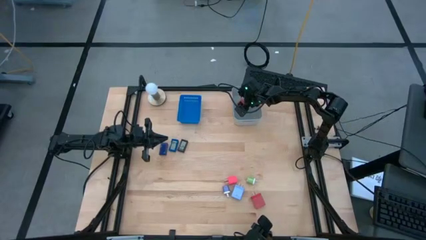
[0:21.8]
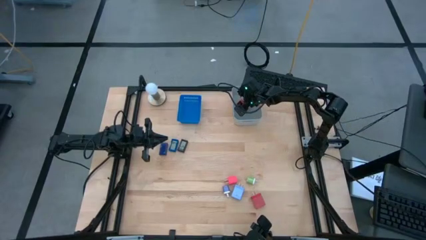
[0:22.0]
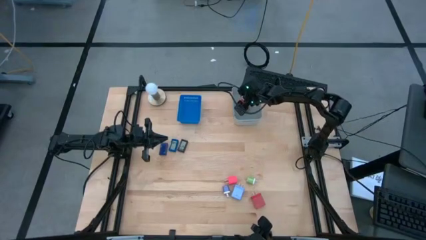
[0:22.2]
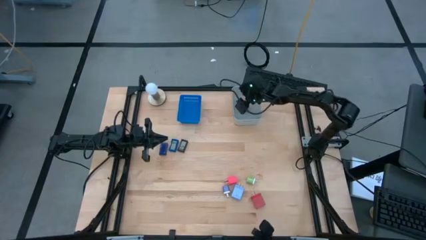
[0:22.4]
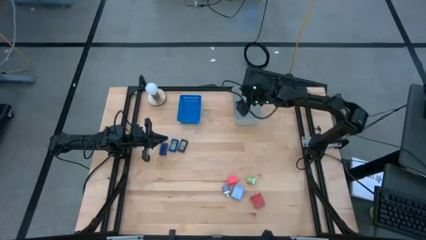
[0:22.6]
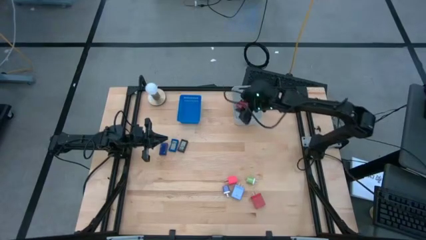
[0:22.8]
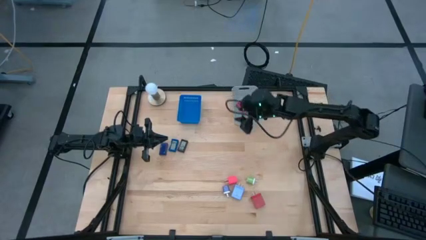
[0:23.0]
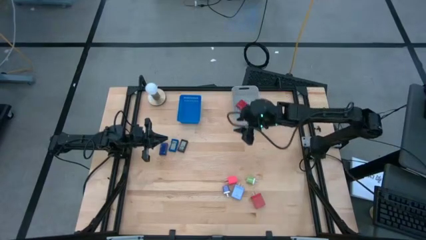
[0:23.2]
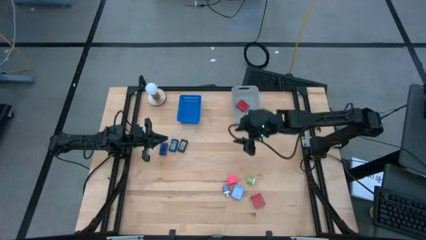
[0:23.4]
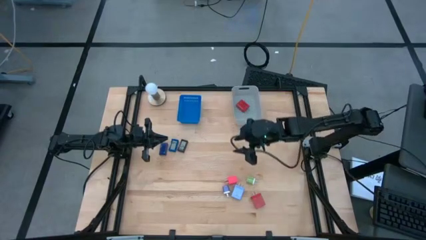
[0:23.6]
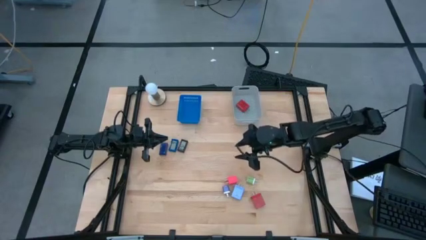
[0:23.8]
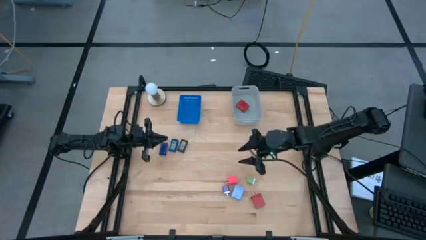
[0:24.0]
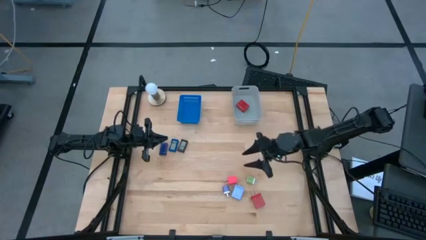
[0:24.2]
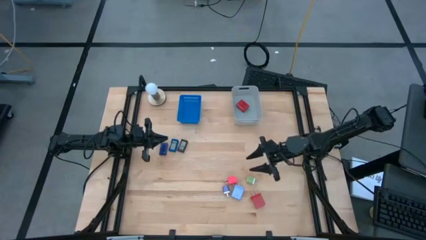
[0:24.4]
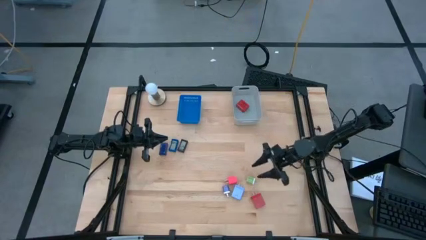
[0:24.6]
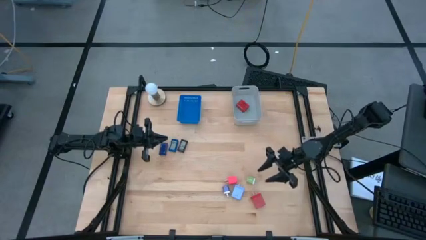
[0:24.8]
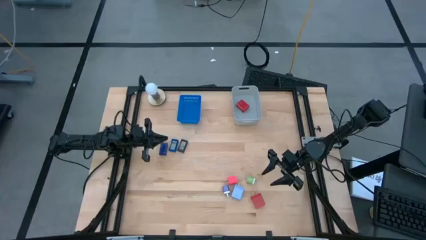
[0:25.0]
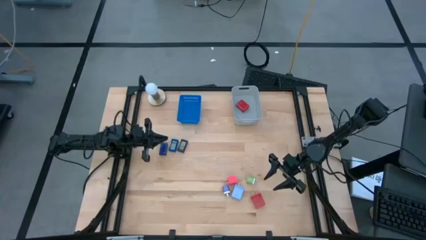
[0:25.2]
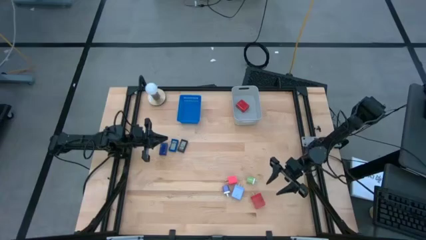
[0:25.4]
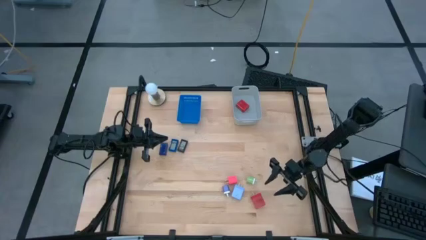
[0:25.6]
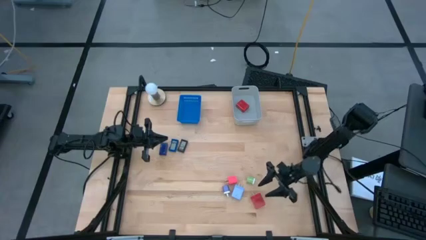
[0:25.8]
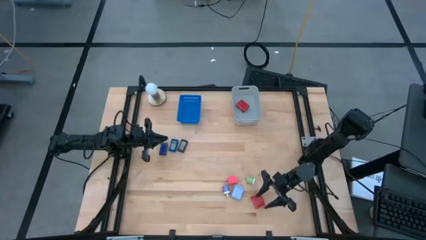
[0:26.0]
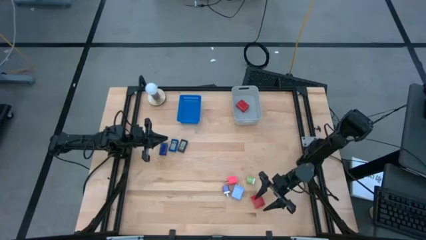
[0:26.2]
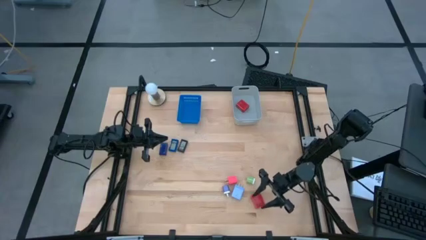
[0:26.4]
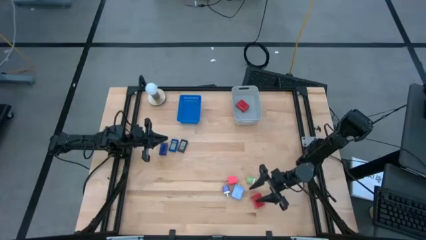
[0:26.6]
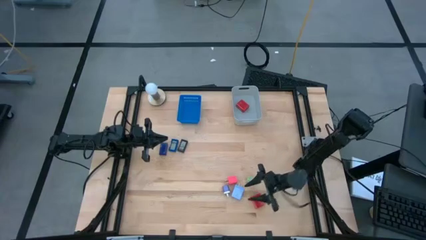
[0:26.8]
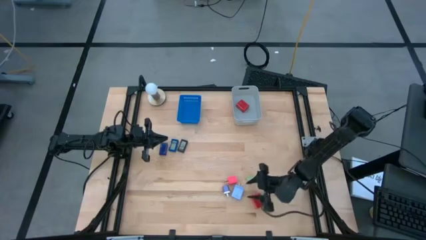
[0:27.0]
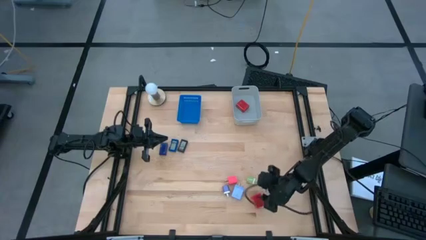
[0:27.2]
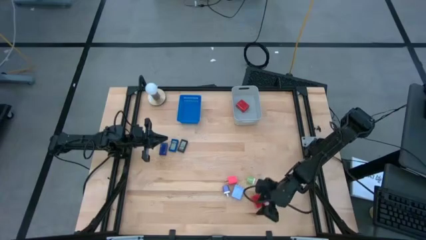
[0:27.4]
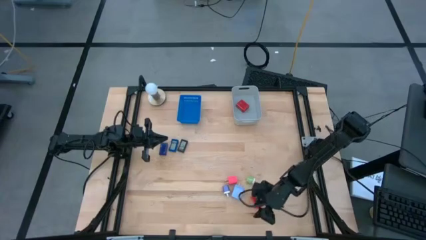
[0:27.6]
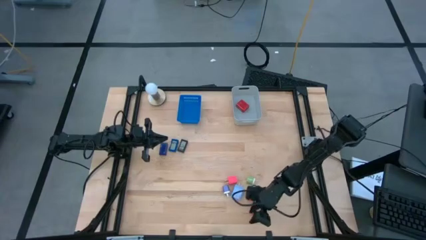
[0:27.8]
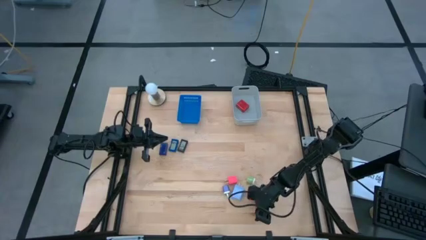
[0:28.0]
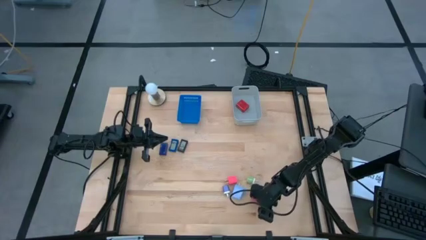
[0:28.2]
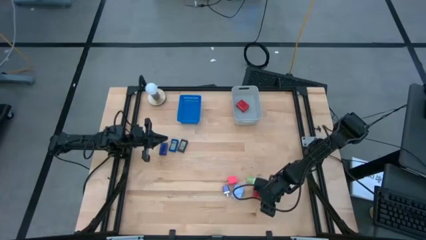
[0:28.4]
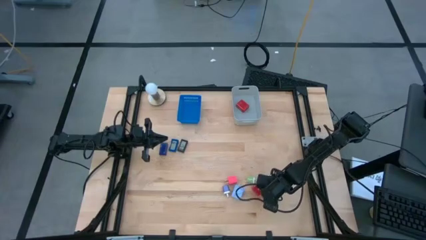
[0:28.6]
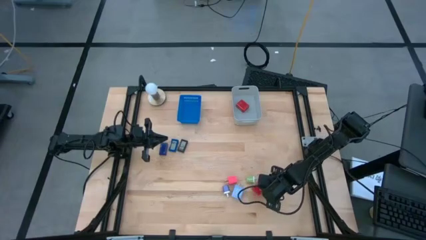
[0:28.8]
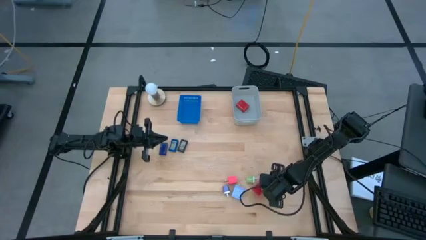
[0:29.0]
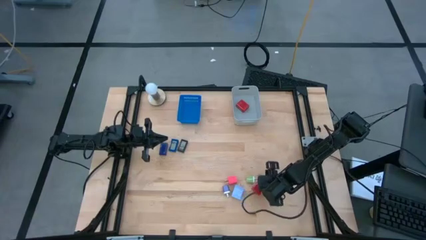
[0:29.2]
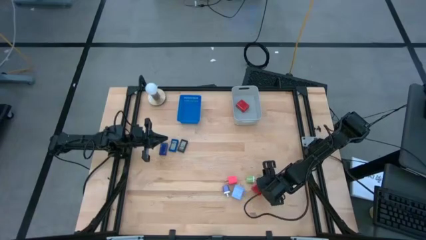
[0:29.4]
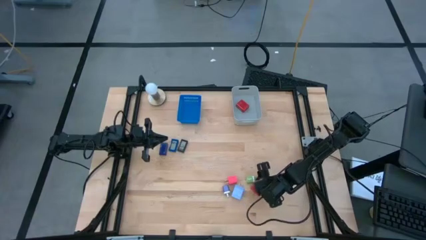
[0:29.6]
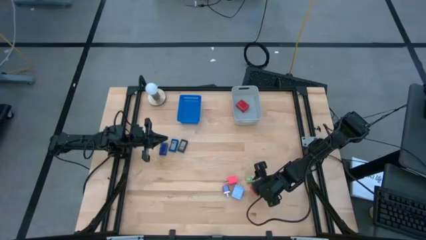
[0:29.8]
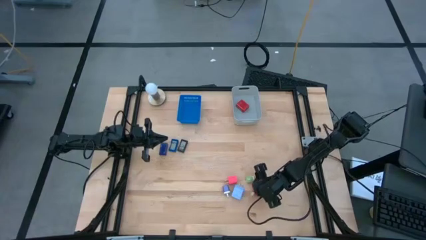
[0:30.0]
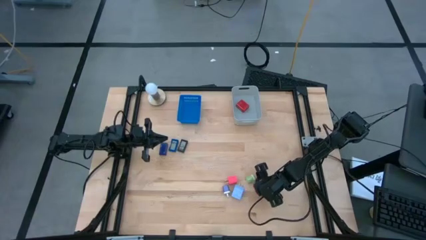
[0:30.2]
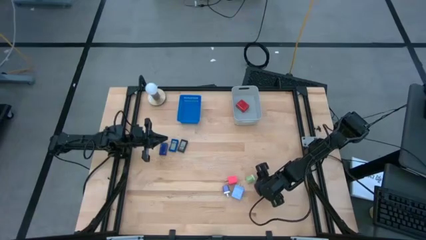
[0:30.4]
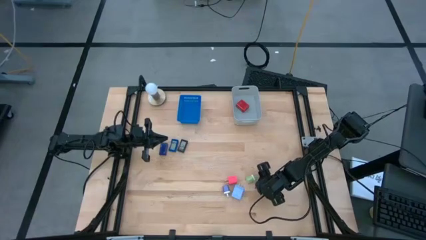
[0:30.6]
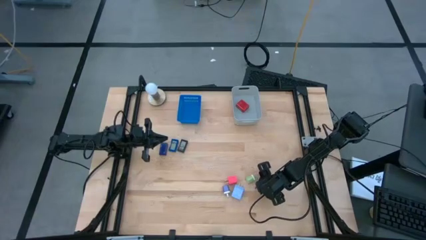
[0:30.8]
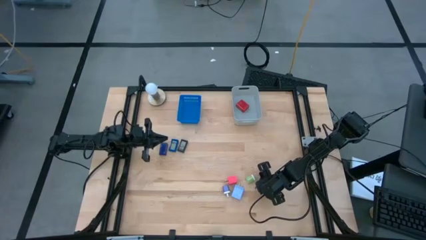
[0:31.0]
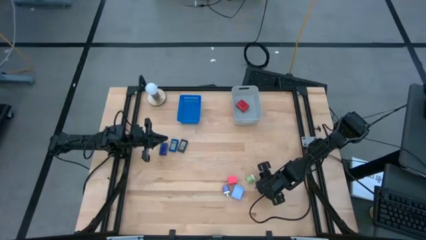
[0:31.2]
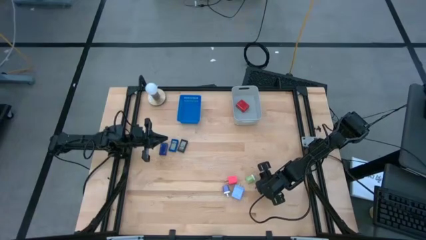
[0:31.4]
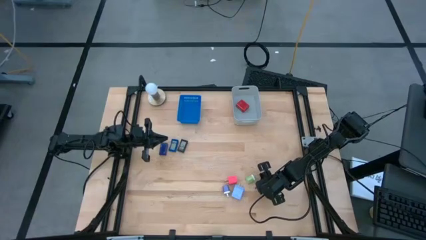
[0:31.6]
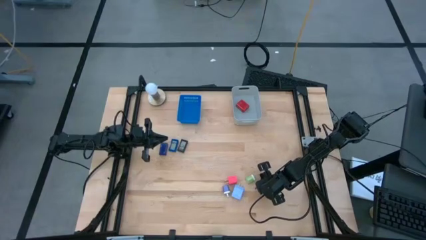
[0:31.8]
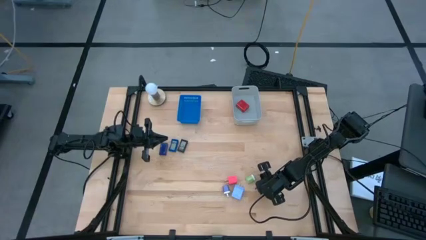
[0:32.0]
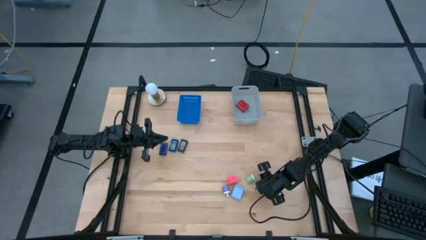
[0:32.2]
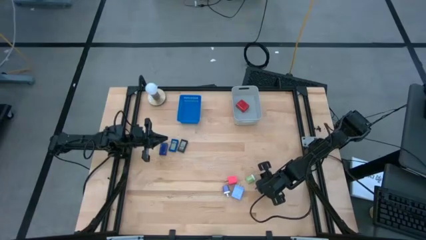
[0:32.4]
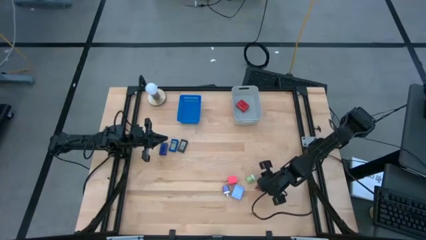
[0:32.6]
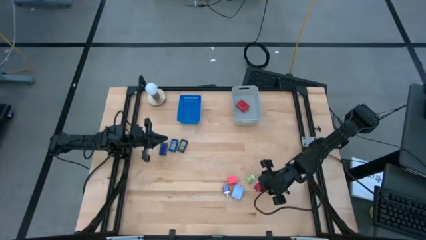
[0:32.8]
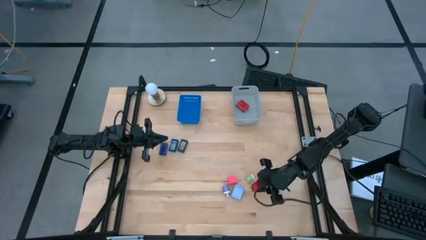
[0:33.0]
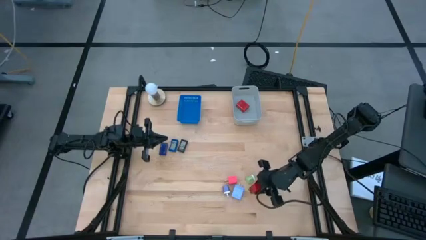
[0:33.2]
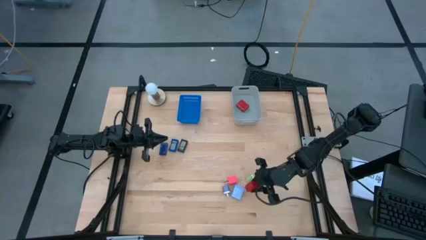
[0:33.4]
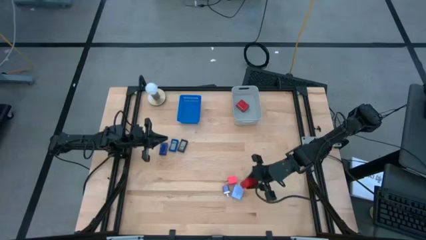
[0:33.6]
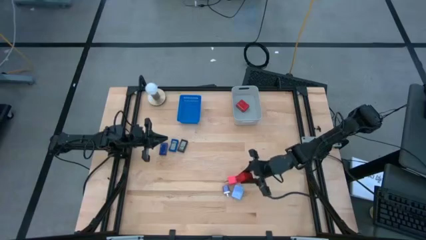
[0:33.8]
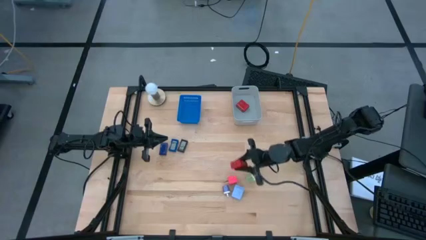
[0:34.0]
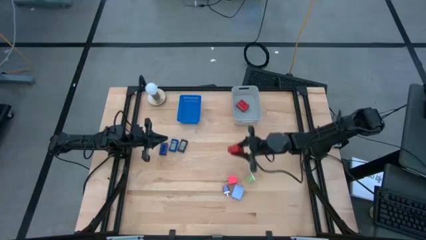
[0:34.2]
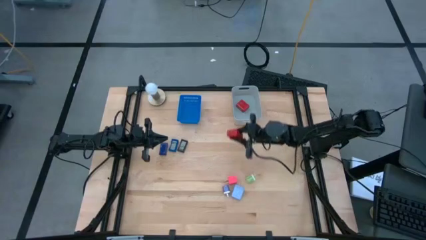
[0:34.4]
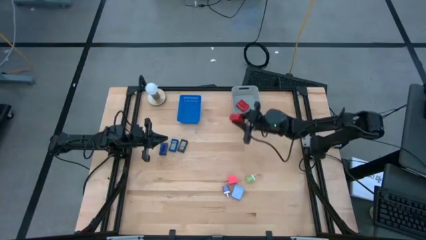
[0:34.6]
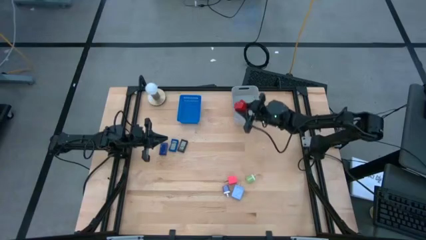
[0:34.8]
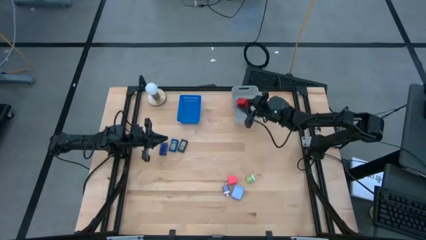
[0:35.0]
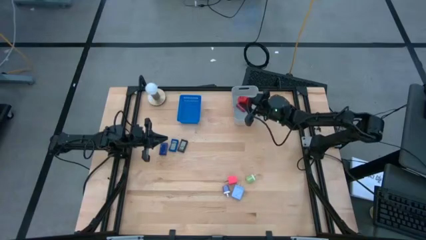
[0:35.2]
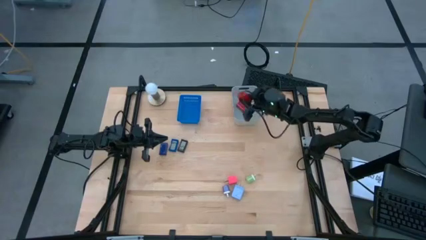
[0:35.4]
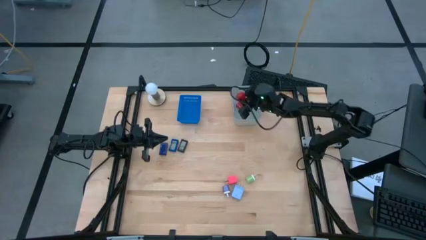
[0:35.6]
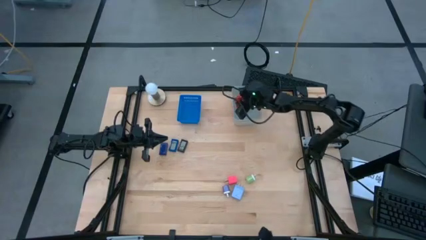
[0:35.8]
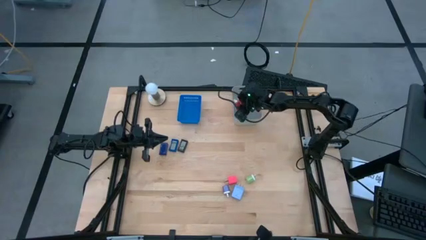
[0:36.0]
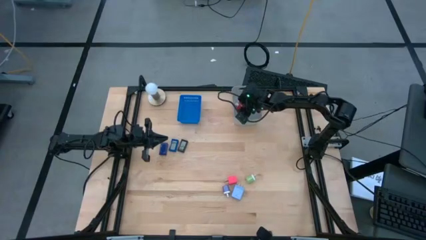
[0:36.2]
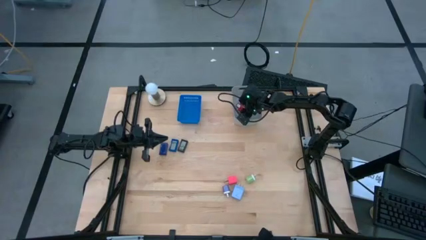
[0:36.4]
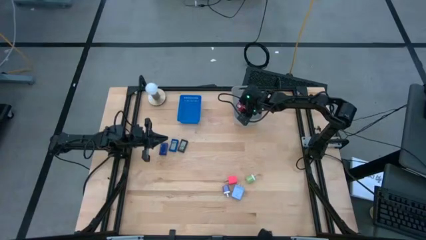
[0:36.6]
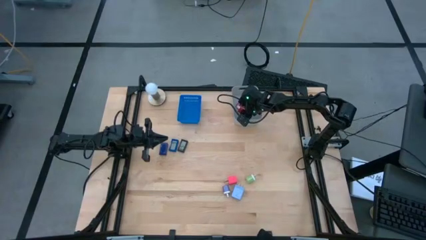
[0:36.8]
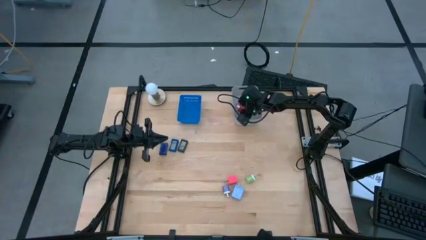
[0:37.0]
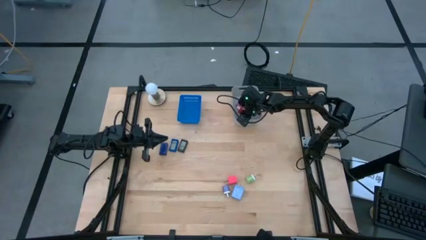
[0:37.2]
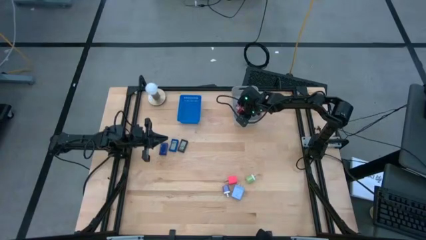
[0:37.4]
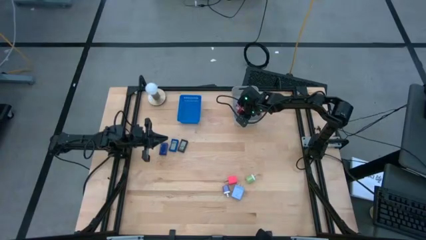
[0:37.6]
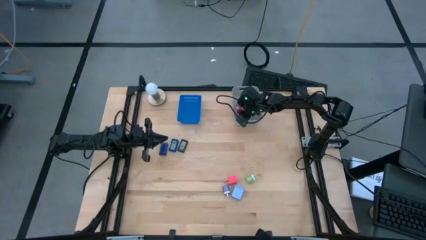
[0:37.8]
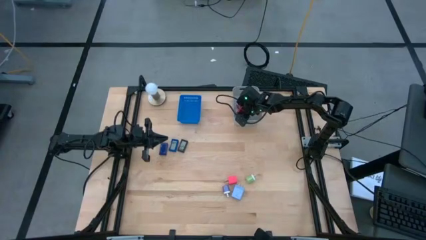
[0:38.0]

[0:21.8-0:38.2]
Task: Pick & Place Office items
Put the red charger adapter into the gray bin
